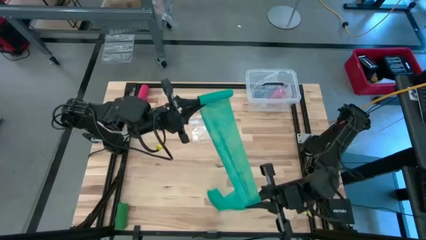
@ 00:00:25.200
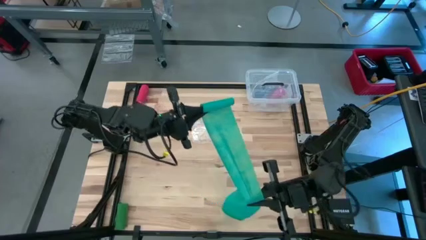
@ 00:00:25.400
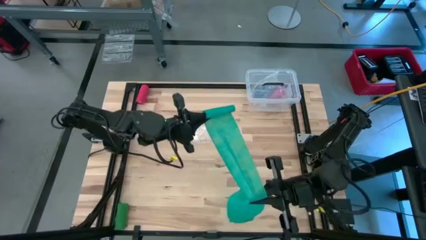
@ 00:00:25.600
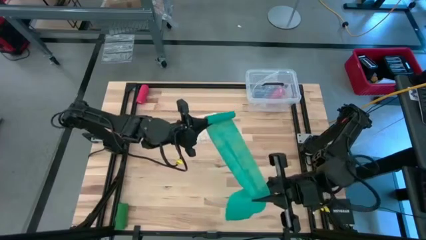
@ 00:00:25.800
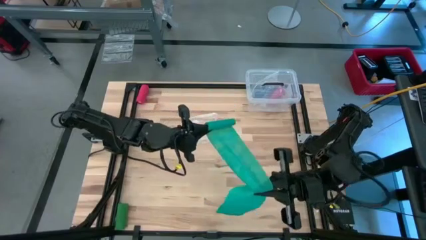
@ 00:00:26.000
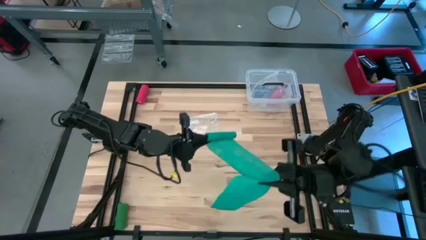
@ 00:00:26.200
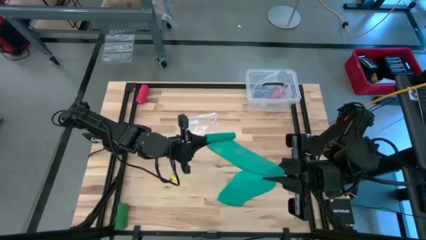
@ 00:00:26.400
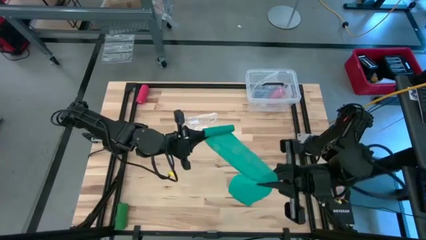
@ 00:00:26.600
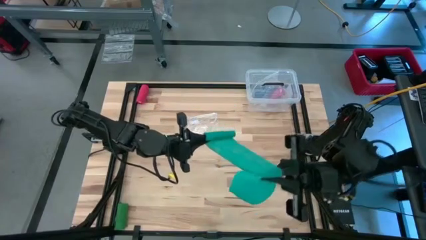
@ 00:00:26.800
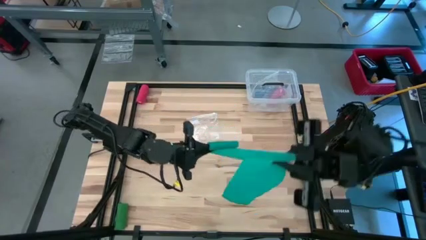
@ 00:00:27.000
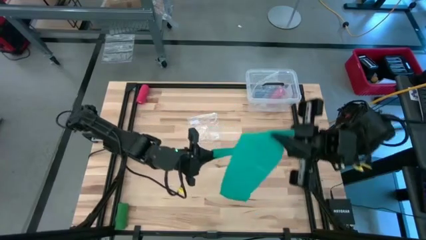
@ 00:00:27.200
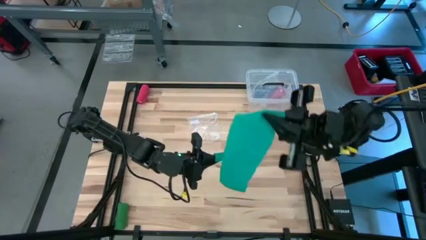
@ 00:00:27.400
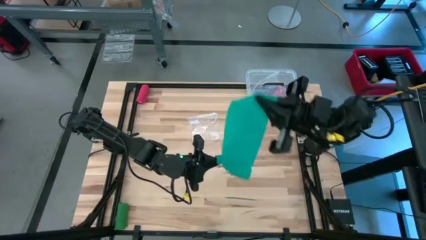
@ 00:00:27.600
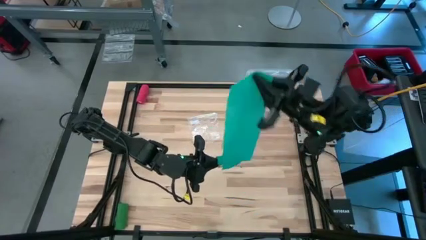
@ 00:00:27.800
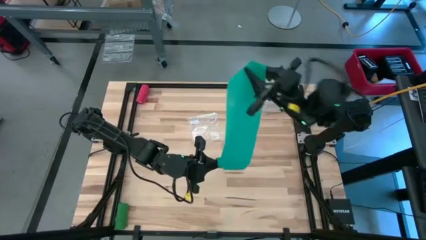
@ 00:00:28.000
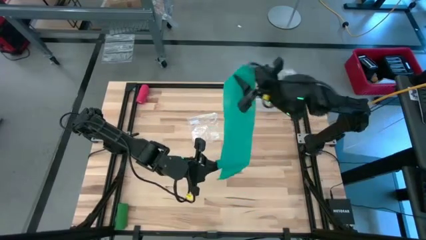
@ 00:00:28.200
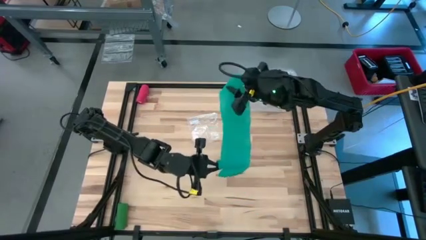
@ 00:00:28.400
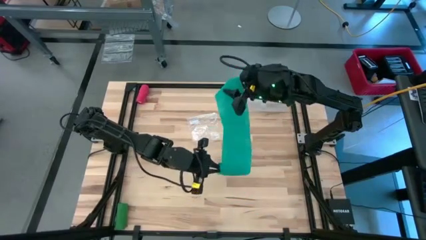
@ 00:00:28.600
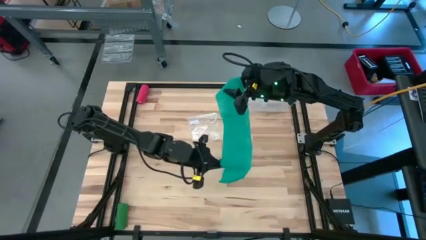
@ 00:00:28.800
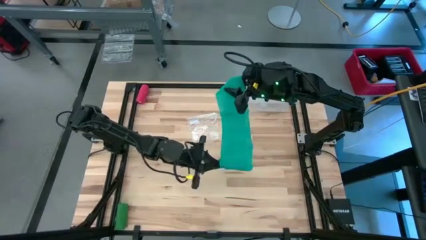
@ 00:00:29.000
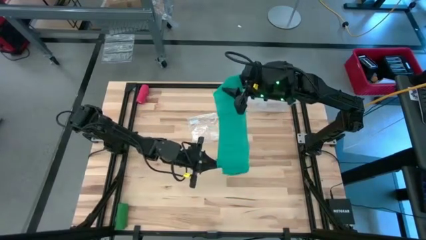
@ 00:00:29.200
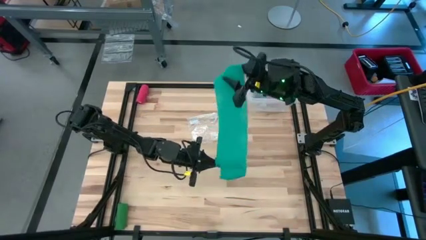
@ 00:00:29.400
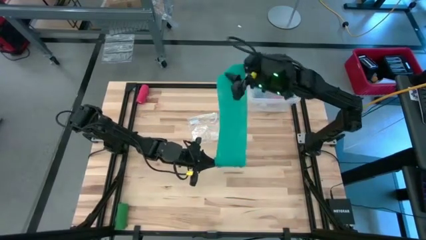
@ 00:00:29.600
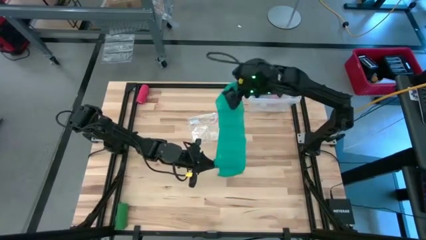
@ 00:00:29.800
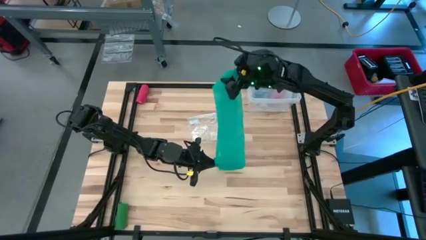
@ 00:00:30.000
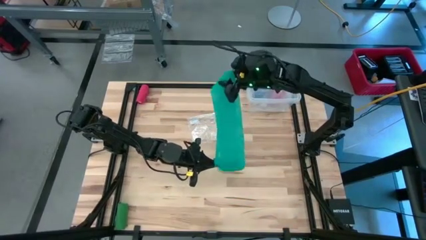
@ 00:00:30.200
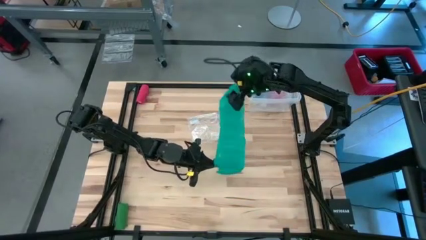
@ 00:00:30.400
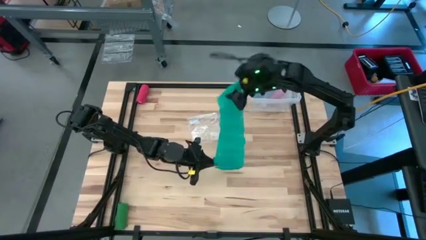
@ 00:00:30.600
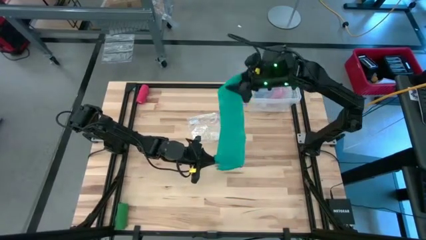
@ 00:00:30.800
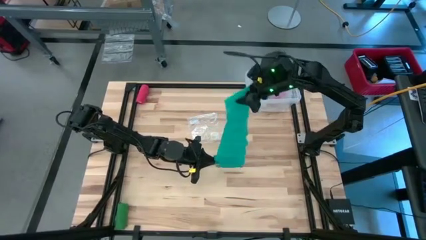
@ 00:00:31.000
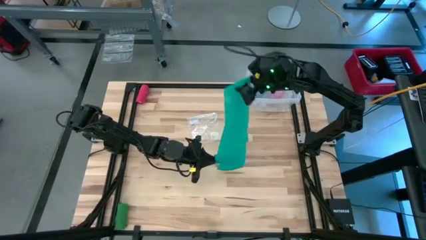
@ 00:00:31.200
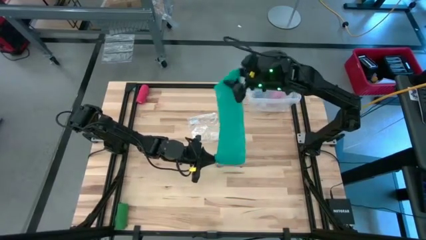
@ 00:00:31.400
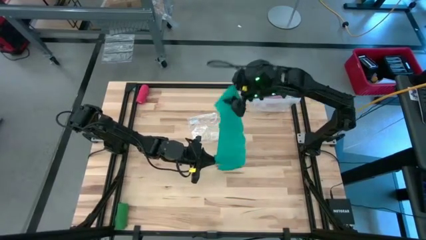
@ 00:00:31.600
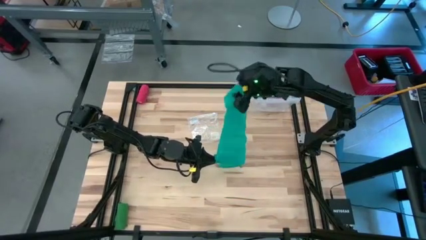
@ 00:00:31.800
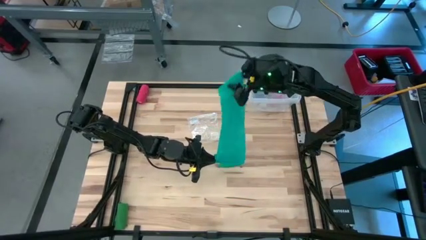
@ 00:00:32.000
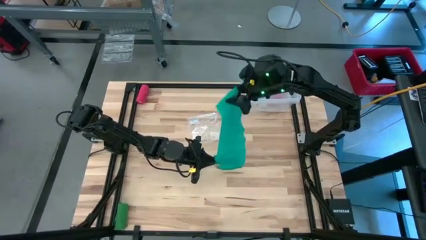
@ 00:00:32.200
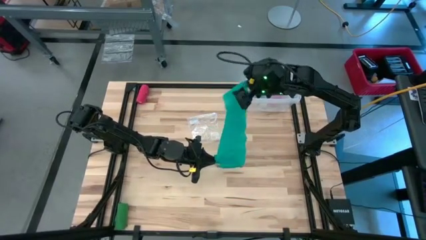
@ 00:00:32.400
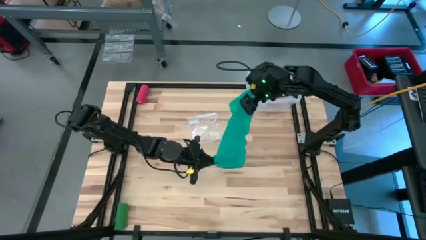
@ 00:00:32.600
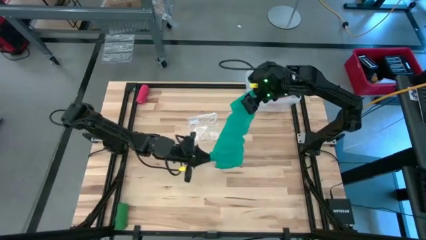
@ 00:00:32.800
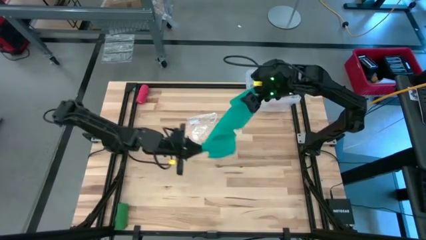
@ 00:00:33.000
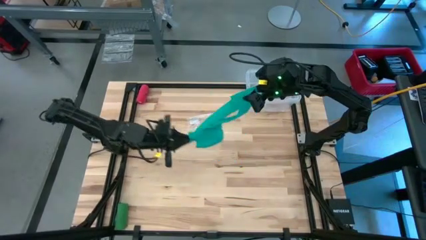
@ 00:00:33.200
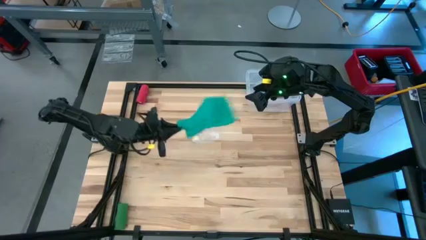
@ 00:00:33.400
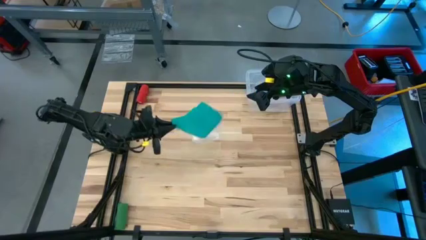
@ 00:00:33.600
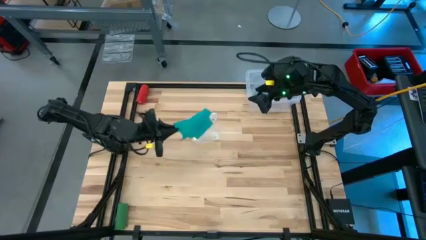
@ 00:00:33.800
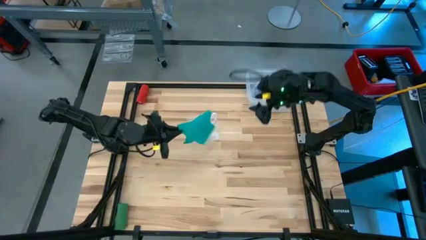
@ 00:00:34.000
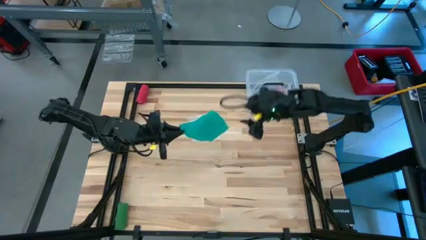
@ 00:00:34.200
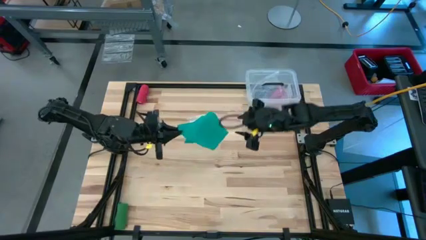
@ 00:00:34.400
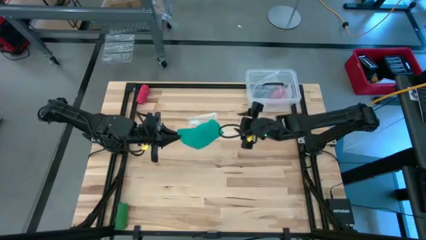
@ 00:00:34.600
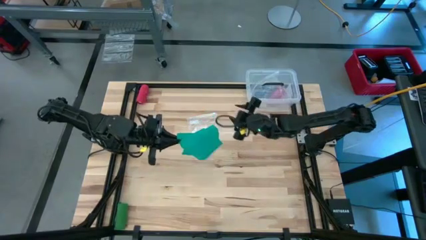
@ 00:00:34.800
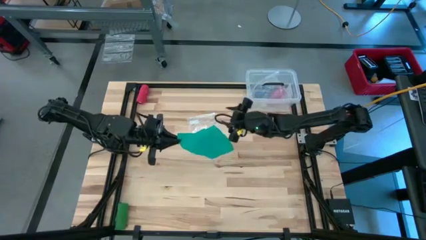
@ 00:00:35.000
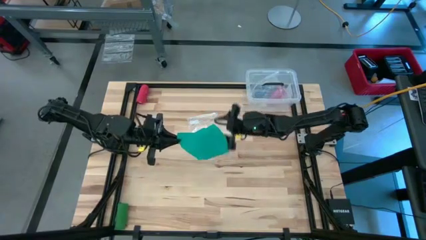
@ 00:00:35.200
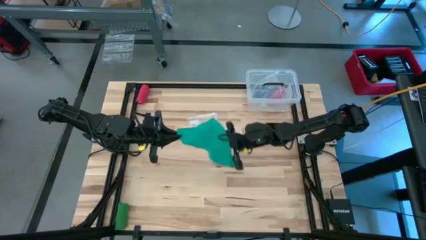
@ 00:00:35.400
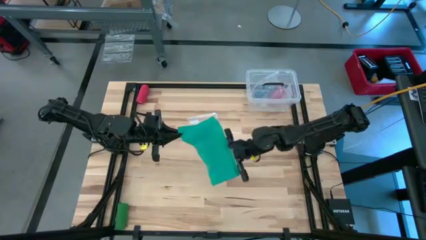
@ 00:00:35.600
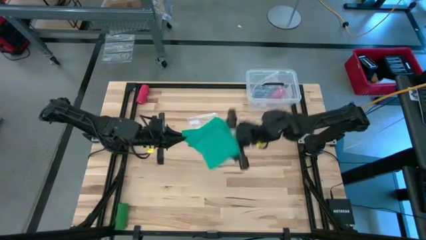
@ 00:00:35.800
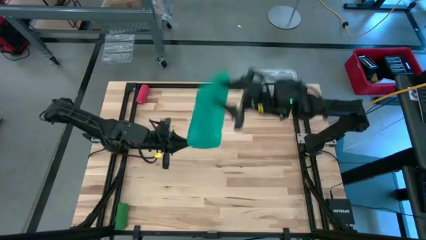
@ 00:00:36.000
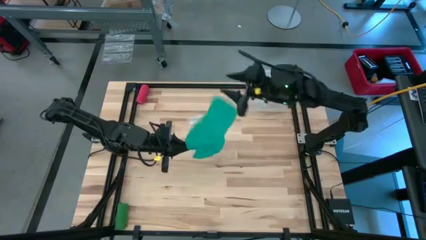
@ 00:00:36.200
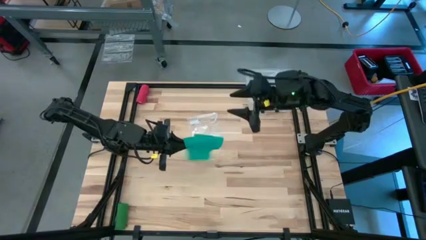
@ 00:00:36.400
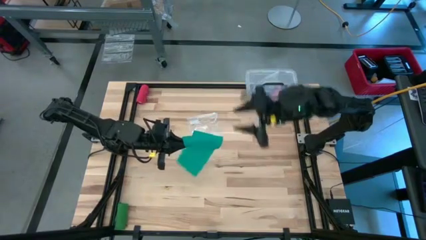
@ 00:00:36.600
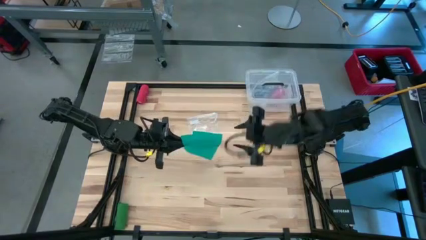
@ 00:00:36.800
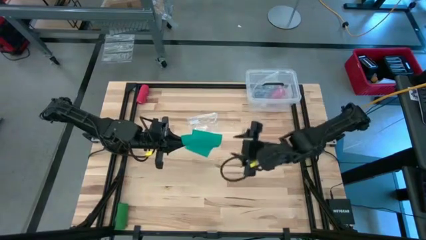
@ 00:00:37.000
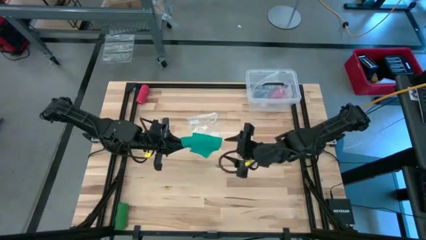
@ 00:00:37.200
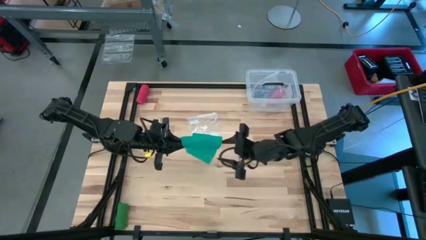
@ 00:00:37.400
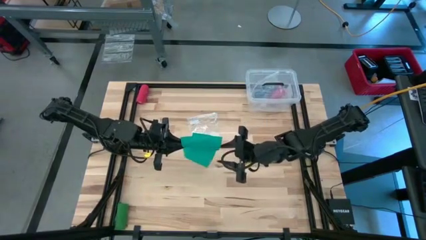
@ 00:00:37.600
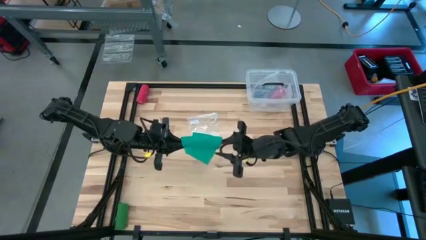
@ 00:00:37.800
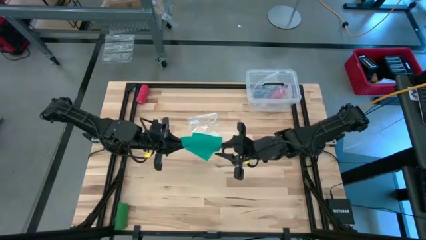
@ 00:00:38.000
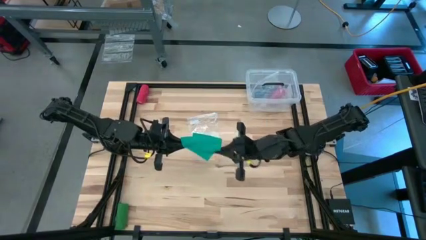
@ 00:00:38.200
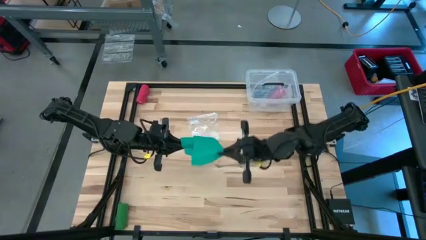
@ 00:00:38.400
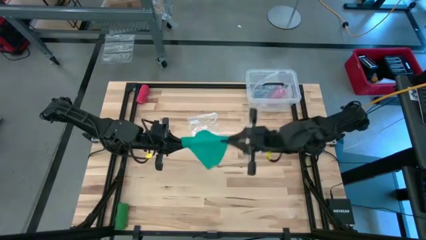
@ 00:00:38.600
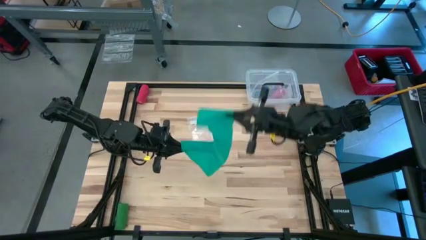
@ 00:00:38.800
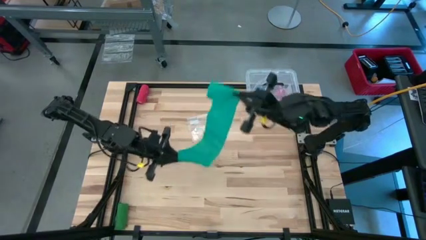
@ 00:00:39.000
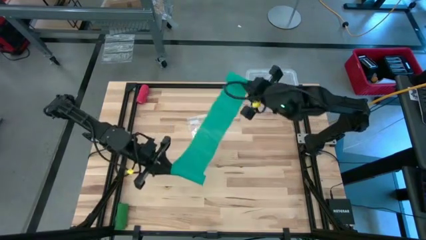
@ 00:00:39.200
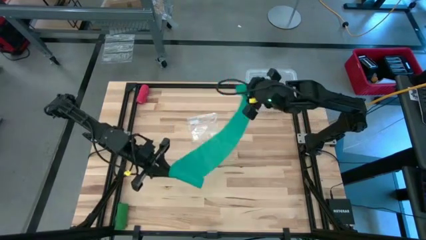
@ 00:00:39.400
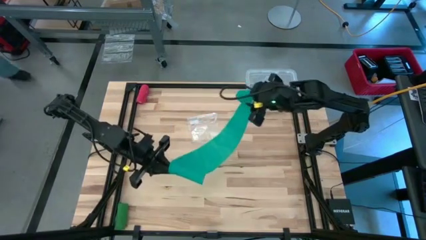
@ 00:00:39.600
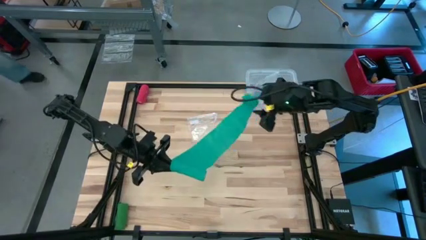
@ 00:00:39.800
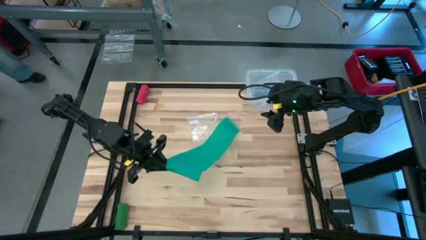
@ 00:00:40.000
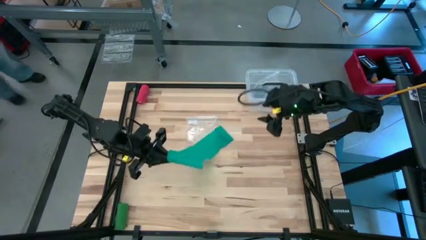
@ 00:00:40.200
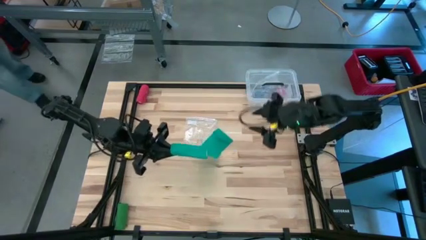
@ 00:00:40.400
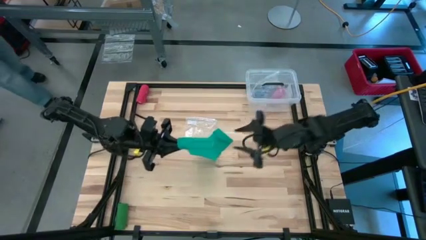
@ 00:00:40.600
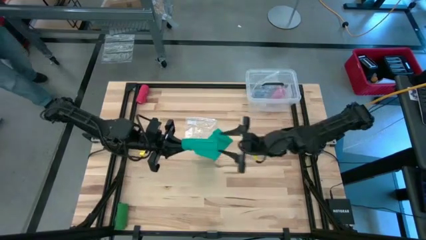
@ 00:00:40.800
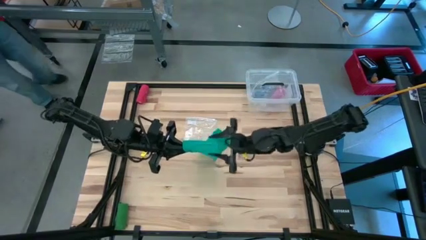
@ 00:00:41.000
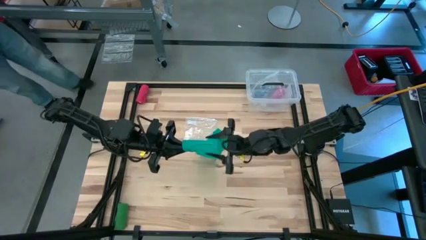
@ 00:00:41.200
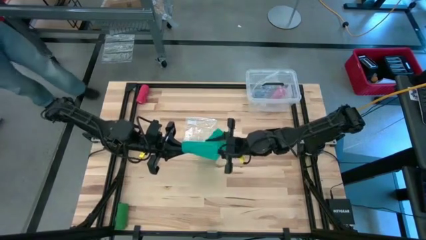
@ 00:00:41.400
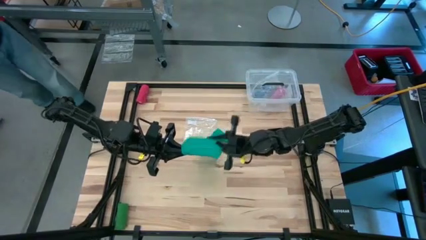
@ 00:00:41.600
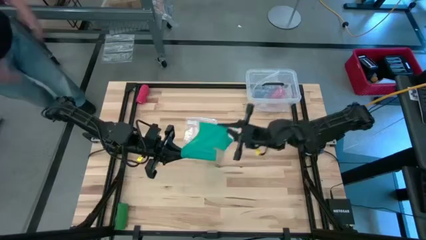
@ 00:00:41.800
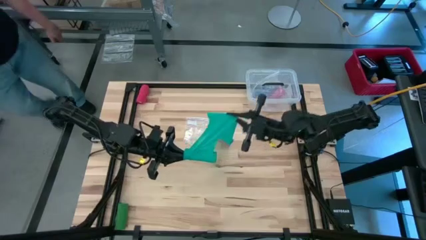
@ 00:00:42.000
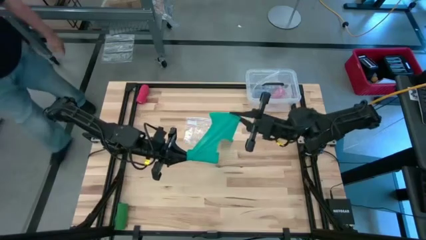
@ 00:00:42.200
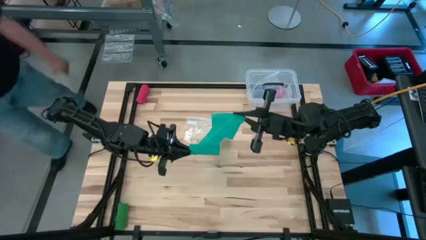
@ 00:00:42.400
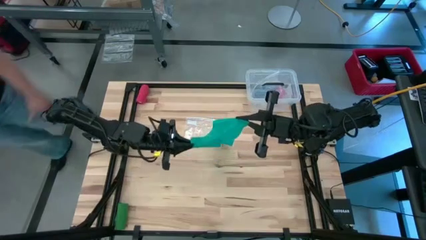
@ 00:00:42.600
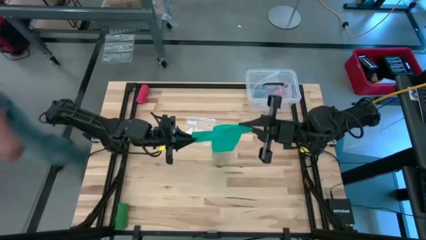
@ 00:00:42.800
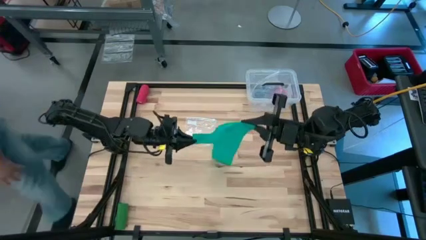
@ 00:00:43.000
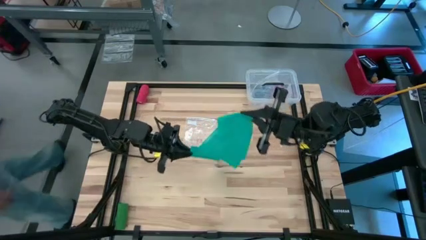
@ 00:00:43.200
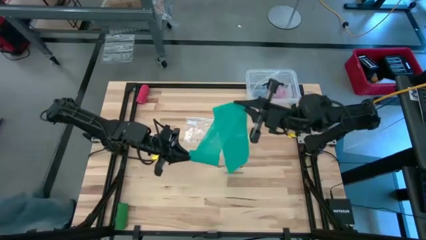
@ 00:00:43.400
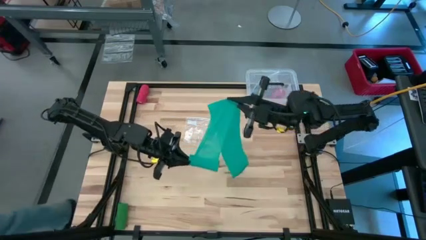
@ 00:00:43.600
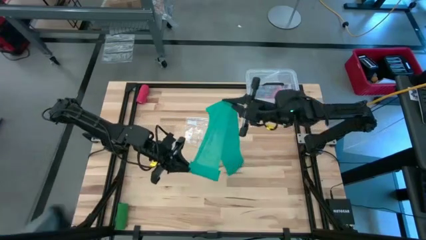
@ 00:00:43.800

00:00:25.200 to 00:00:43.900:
Task: Roll bandage
Roll the green bandage
